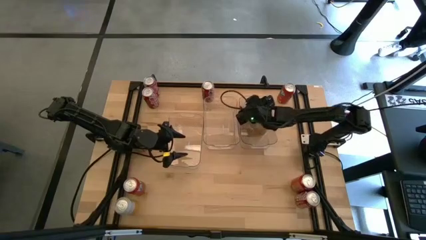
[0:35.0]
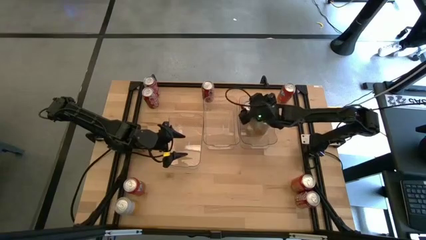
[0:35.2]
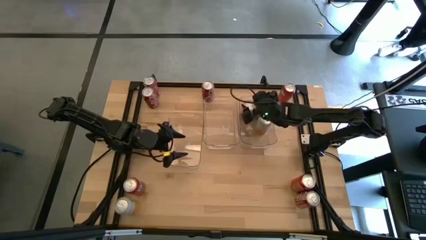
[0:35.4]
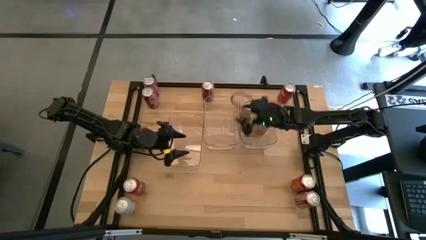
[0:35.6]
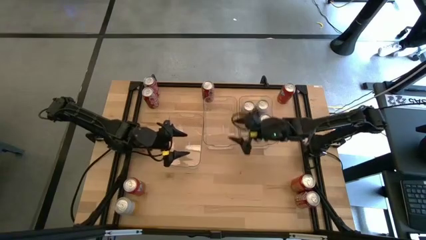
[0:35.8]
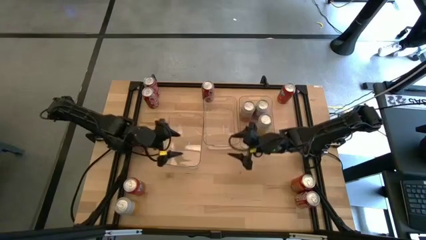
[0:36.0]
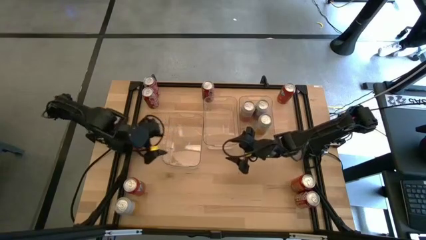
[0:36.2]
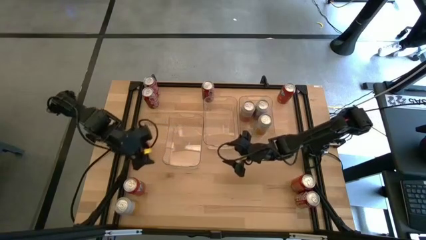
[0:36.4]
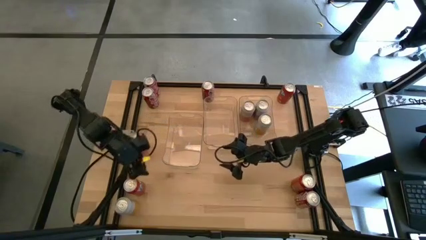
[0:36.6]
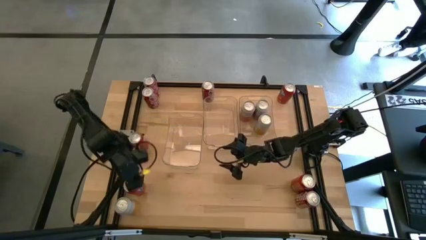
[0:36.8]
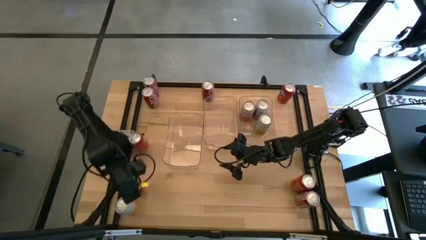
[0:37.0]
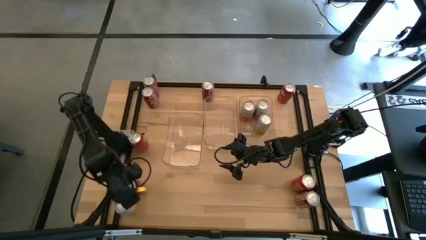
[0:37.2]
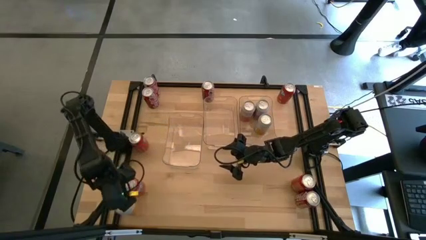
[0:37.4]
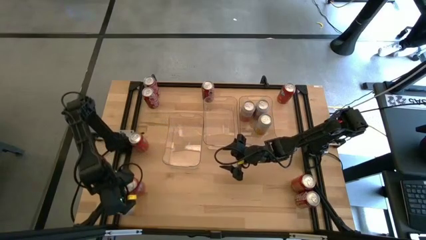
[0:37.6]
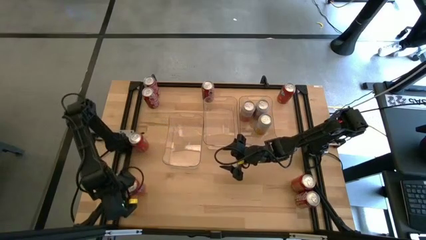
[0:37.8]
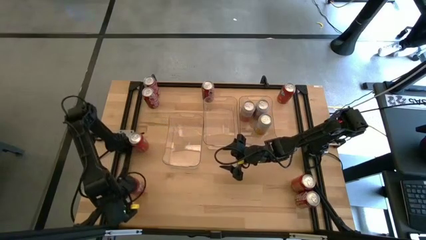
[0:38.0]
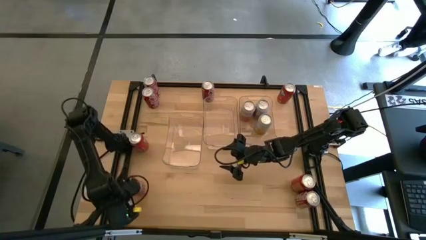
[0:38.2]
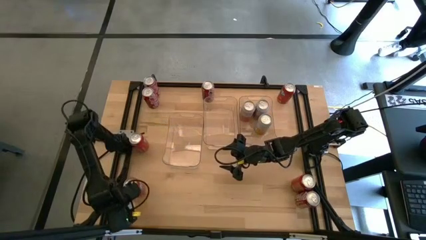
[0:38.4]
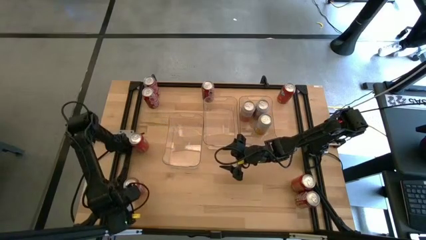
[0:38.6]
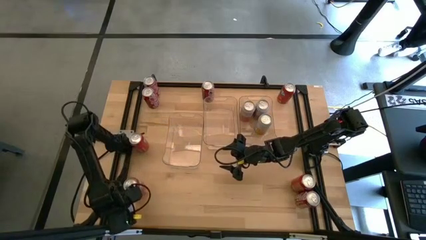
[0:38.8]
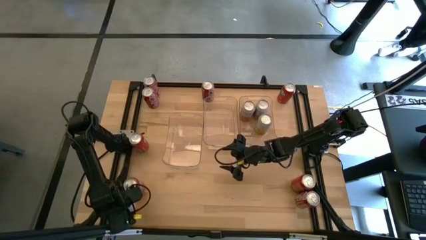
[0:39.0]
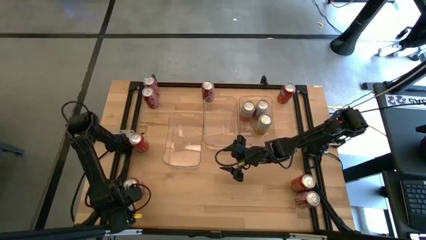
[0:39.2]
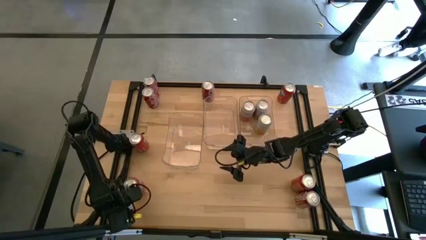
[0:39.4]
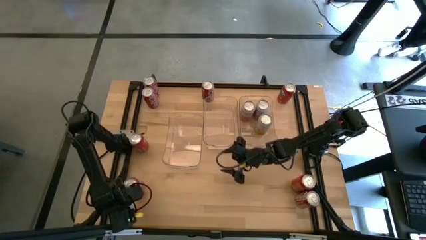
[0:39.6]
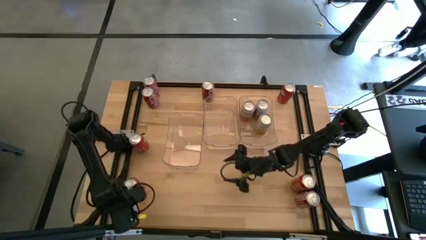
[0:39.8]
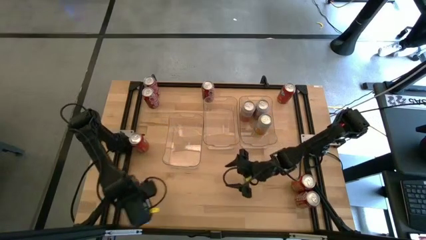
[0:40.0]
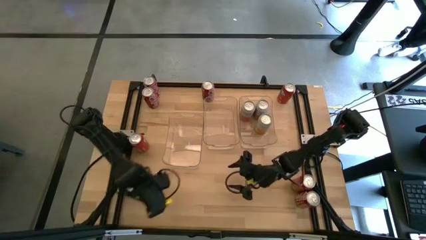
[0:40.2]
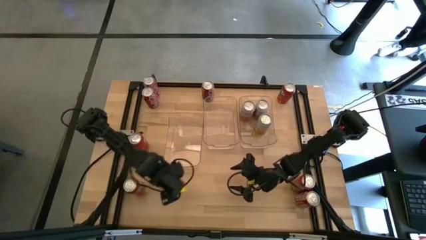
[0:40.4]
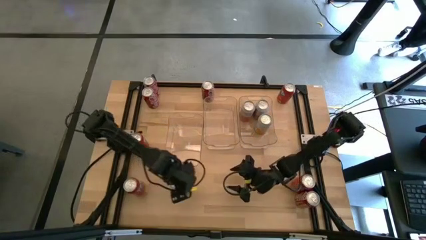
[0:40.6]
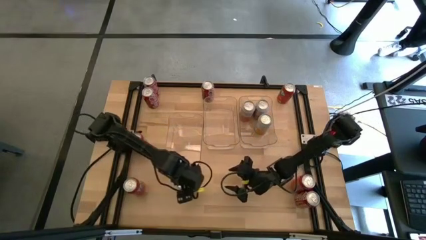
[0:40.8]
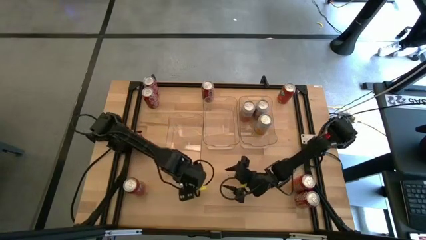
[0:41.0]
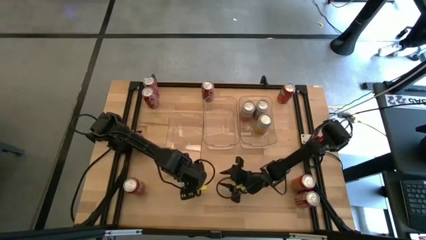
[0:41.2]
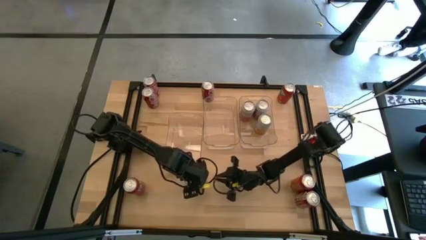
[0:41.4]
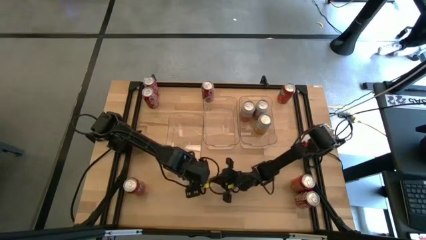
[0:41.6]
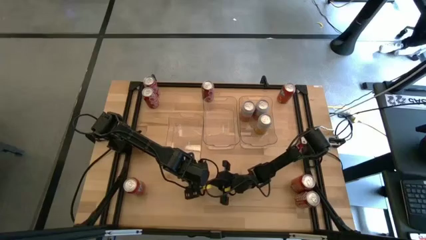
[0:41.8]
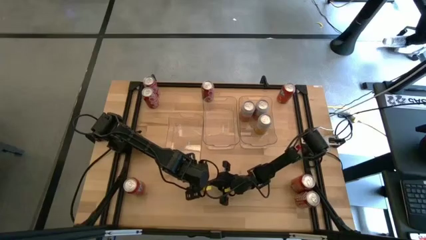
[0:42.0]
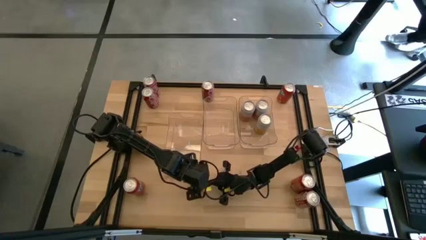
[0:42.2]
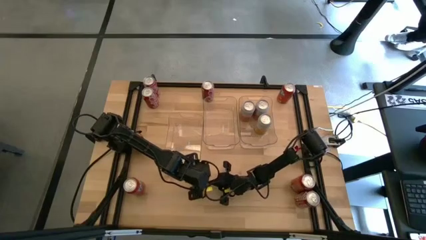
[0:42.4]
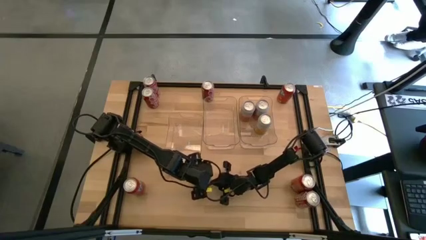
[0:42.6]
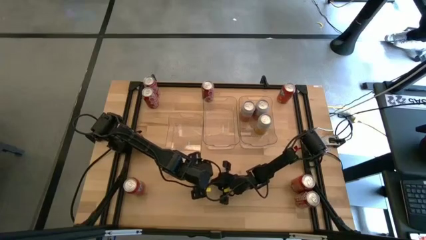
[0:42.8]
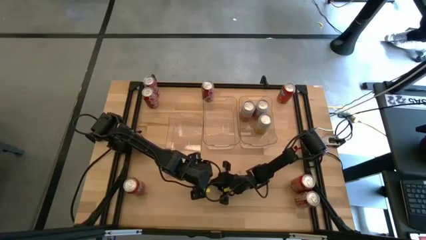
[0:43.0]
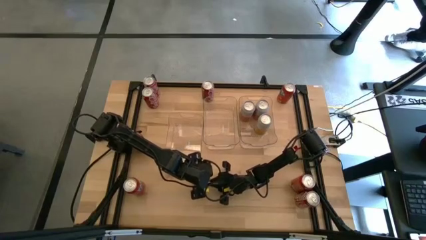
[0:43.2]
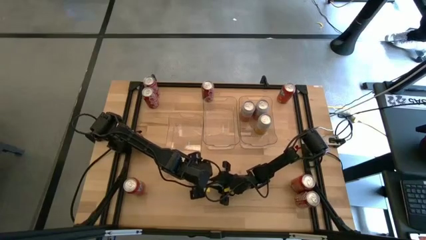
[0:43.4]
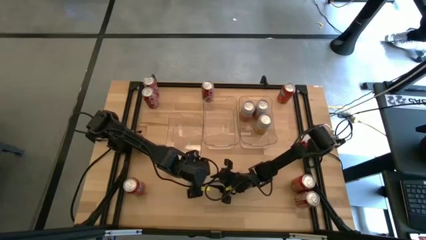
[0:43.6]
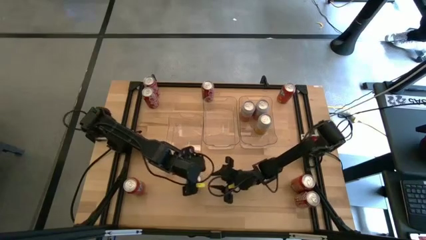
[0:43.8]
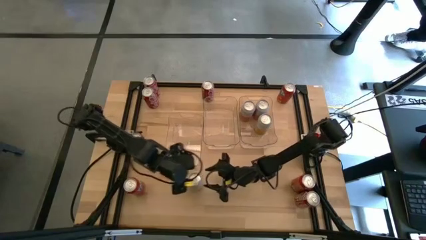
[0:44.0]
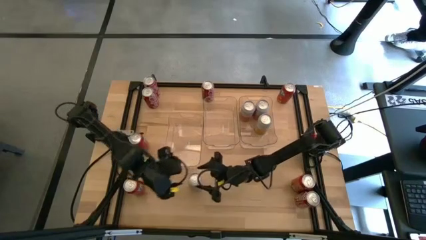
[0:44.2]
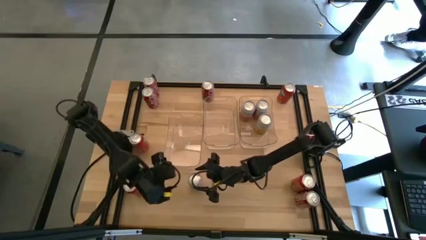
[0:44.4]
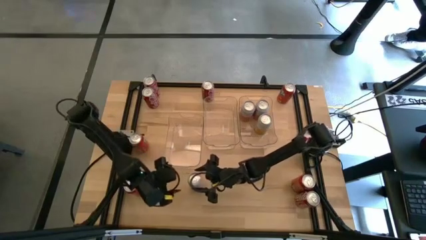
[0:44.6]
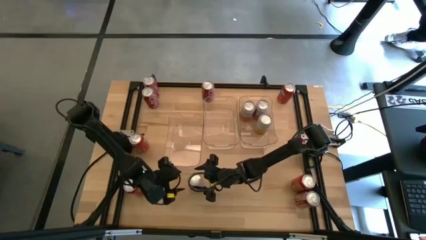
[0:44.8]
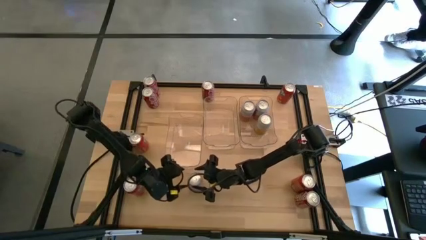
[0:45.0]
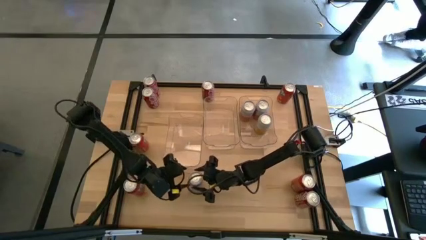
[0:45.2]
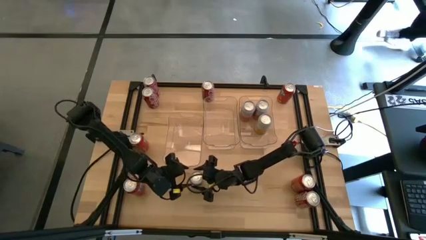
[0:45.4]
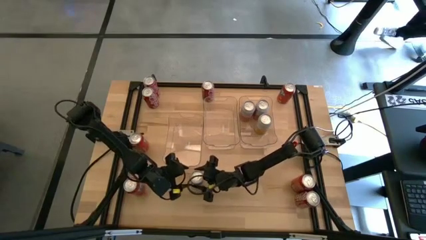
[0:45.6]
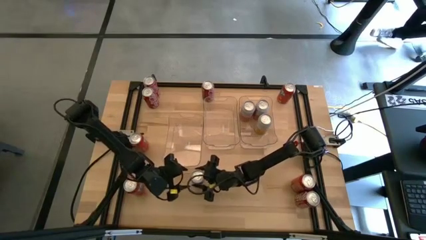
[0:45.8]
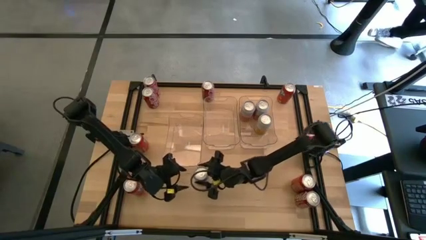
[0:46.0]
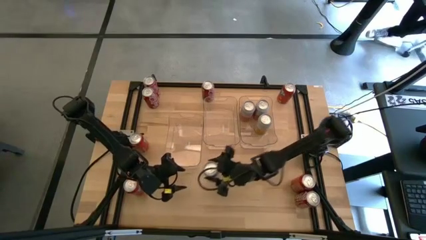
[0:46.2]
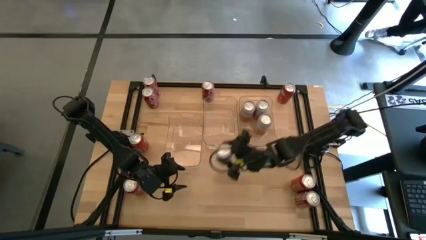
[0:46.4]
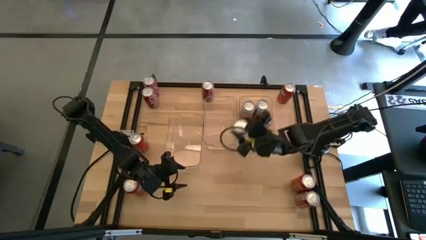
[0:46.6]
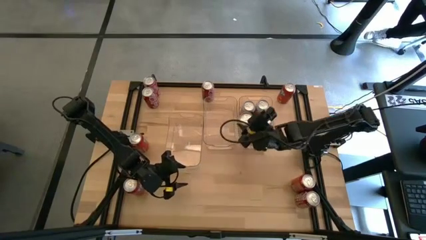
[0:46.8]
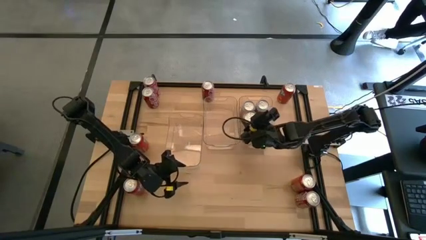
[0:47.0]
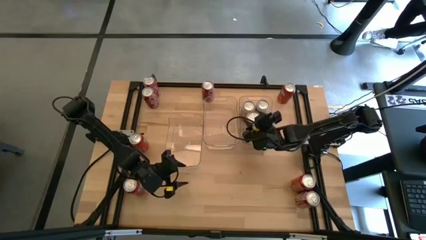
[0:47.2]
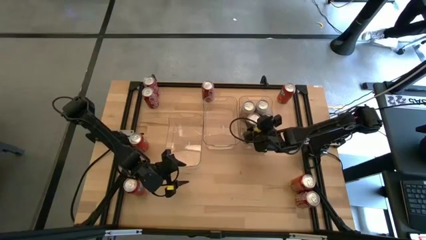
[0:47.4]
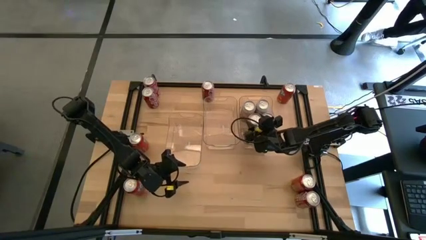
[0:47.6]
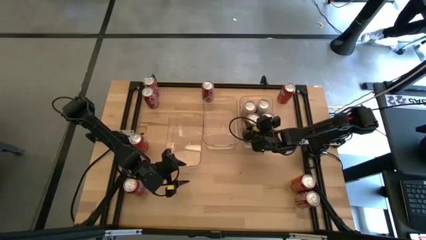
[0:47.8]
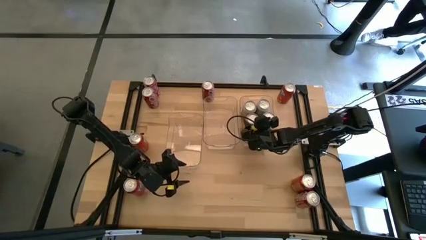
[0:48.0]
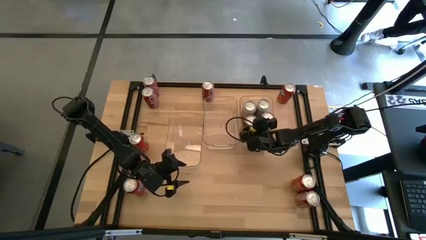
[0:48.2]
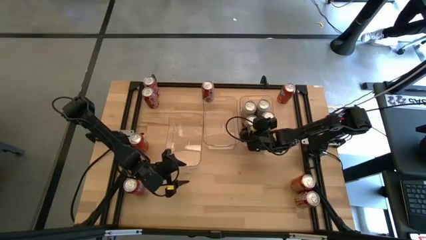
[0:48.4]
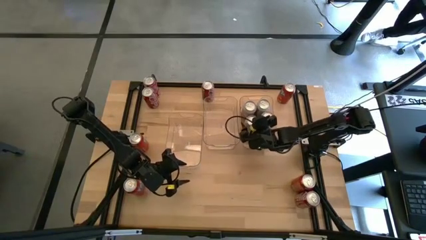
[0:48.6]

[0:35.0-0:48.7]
Task: Sort soda cans
Put the white soda can into the right transparent bin

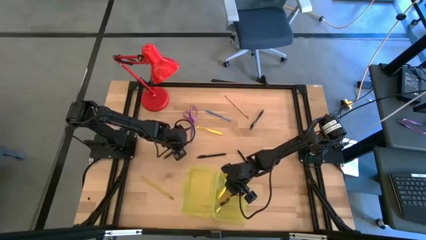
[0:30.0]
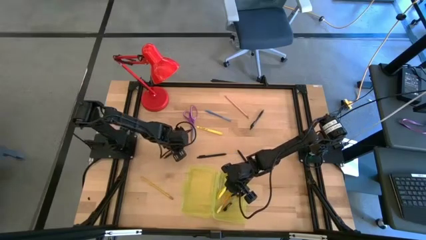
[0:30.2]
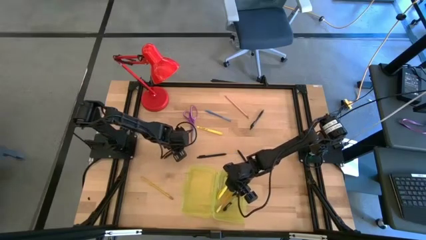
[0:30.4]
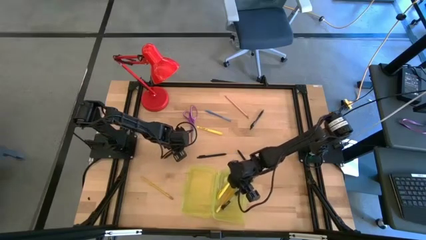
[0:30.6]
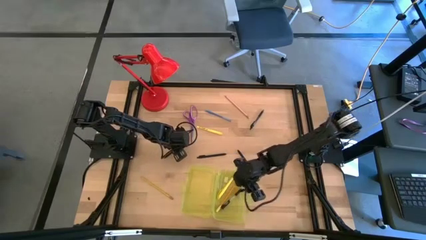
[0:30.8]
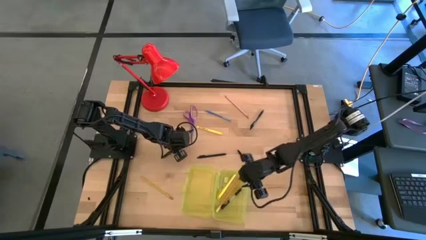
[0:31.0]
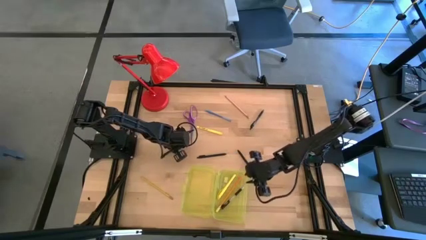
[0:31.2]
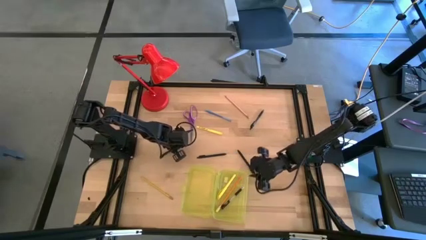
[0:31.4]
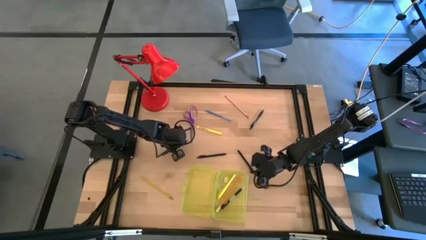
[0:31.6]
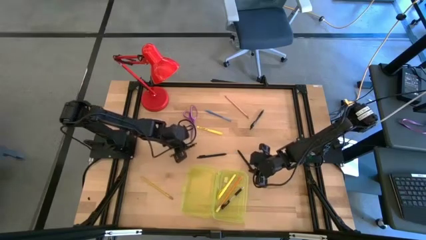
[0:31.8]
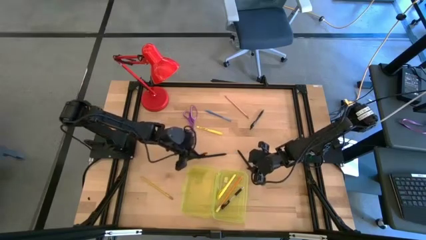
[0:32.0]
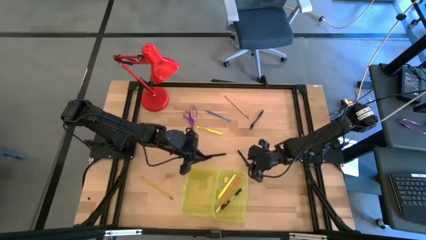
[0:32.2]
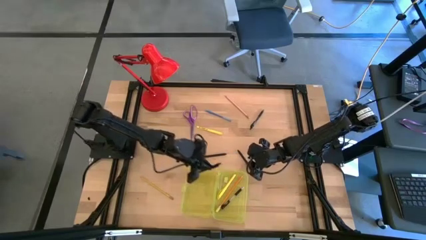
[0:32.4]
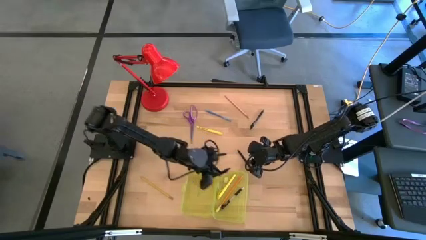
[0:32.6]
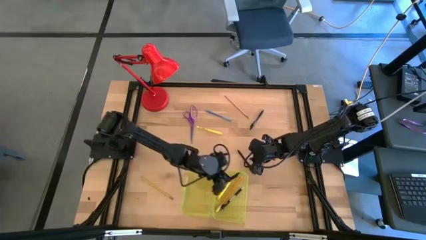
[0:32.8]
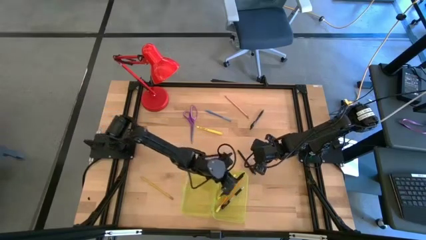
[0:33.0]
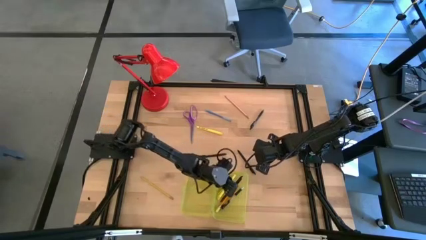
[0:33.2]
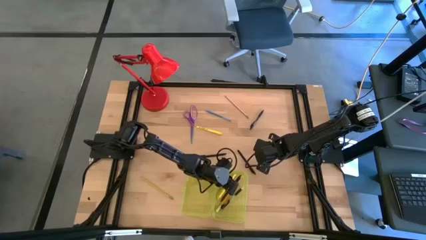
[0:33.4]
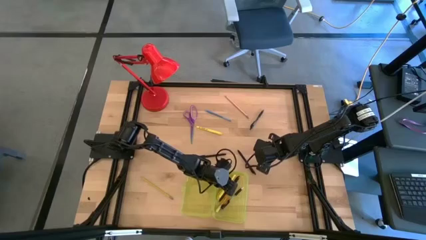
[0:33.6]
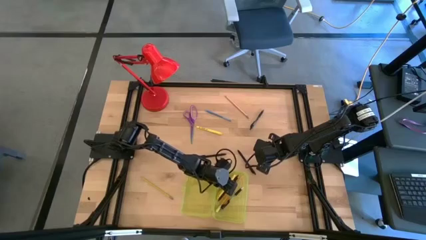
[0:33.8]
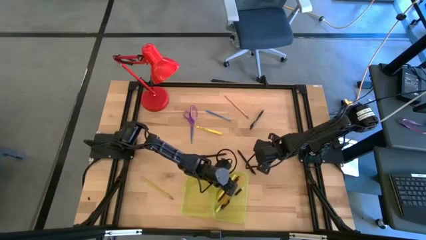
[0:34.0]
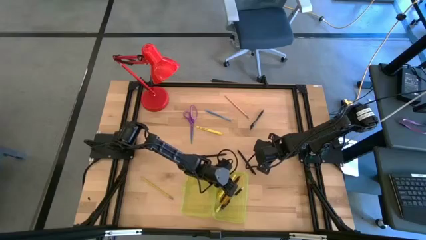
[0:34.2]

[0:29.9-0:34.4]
Task: Pick & place school supplies into a supply box
Put the black pen into the yellow supply box
